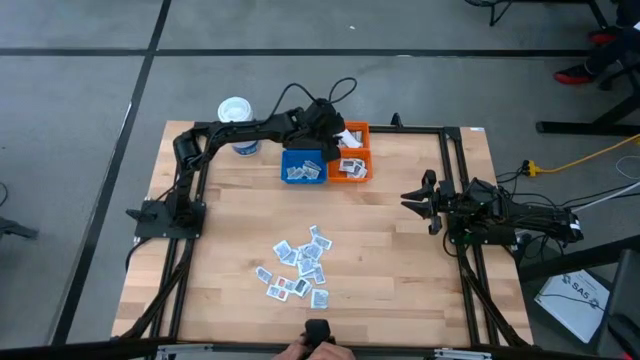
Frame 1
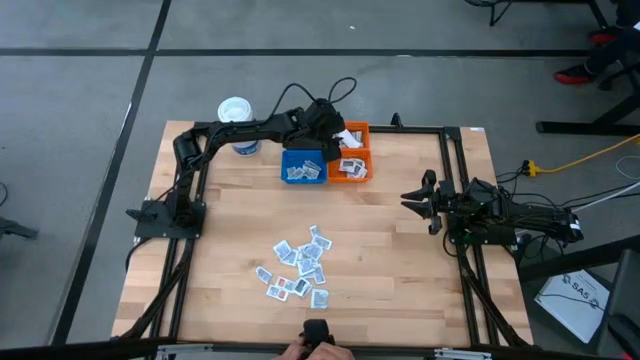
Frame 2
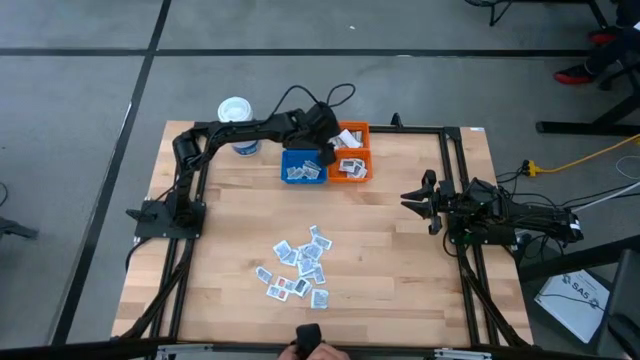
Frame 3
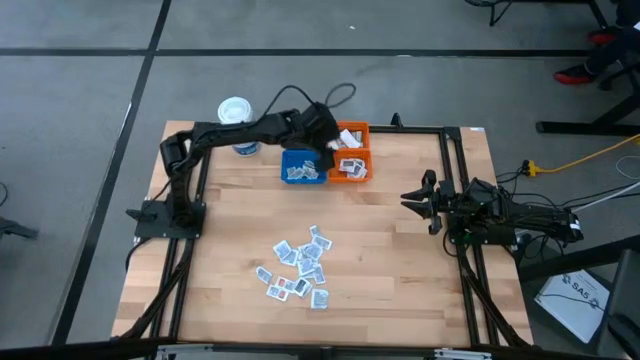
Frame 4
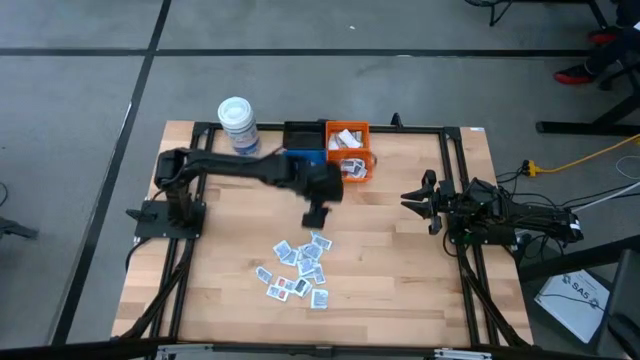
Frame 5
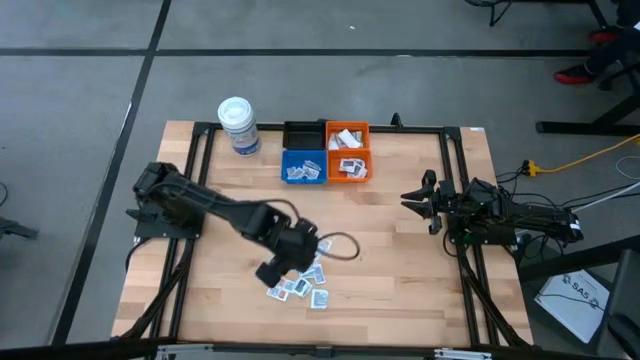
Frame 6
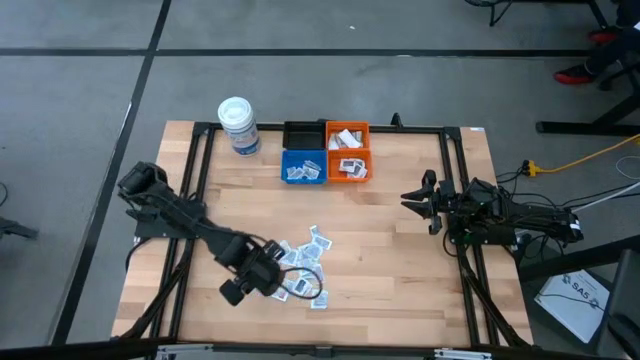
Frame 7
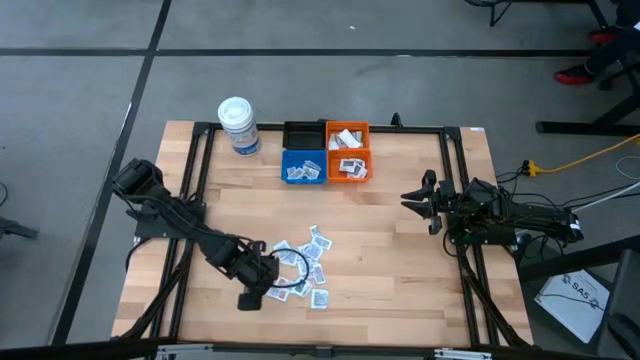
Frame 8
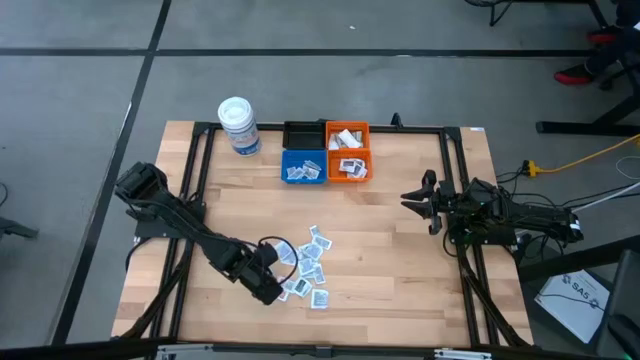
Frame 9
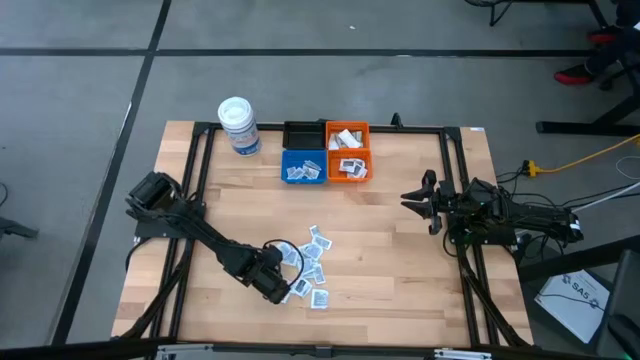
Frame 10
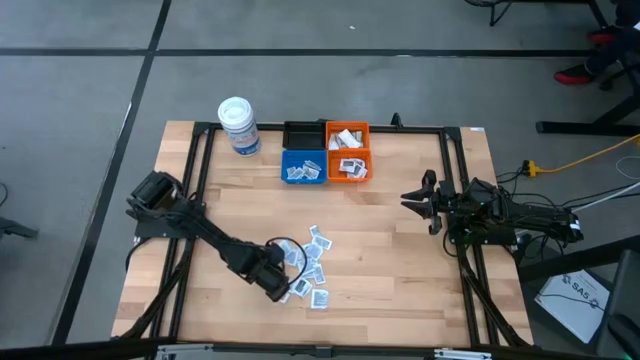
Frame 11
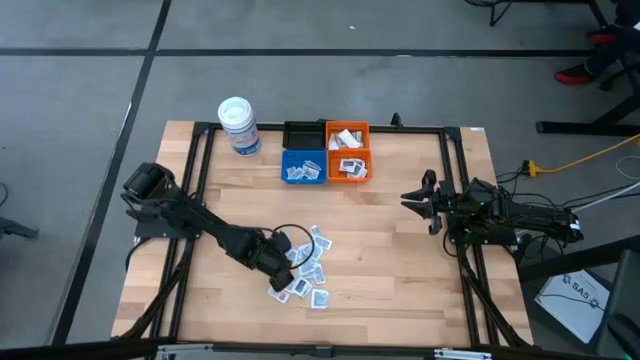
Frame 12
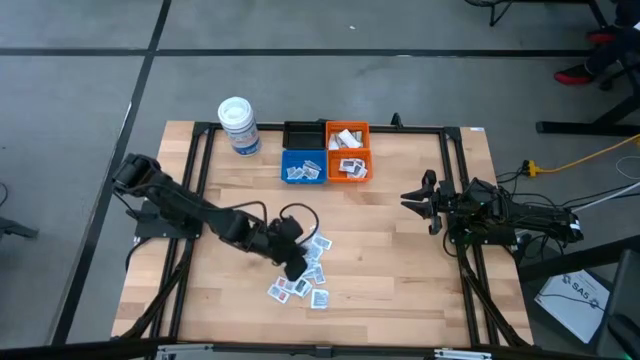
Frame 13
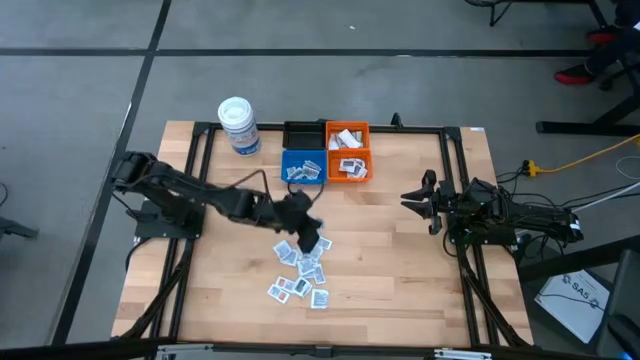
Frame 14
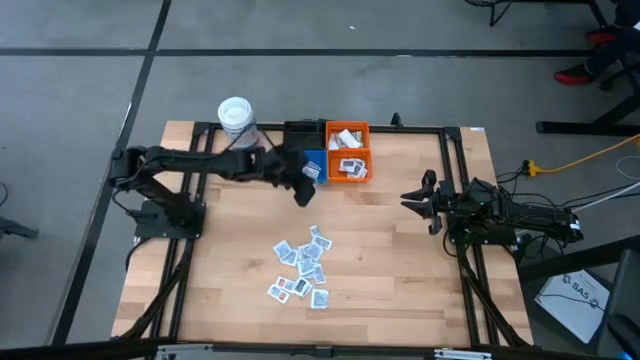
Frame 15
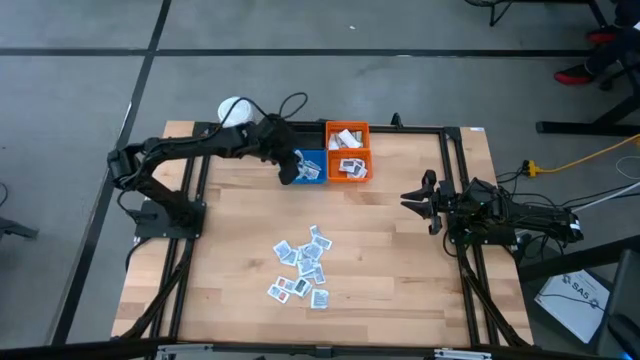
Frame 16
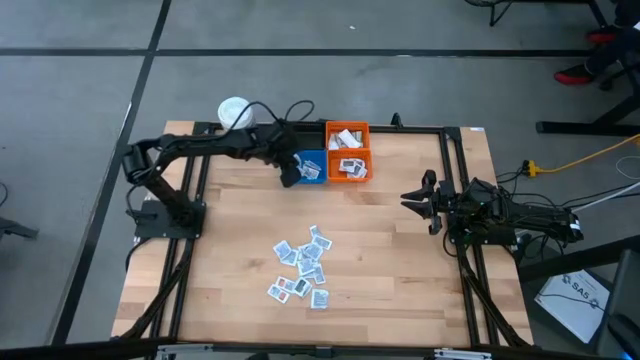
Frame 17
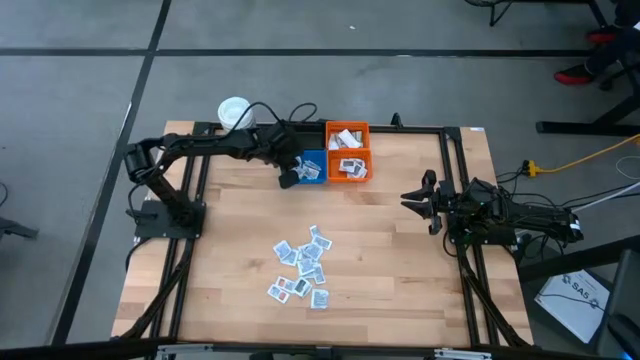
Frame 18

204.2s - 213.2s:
Task: Pick & Place First Aid Supplies
Put the ointment pack into the blue bin

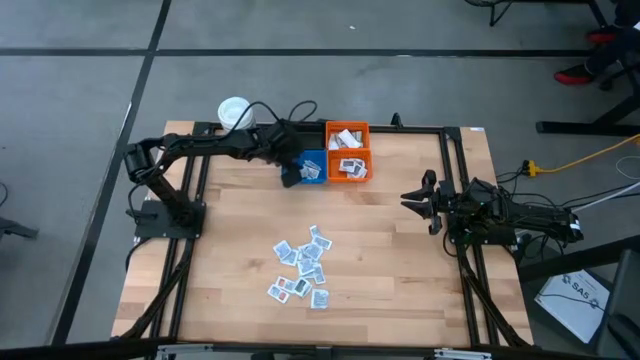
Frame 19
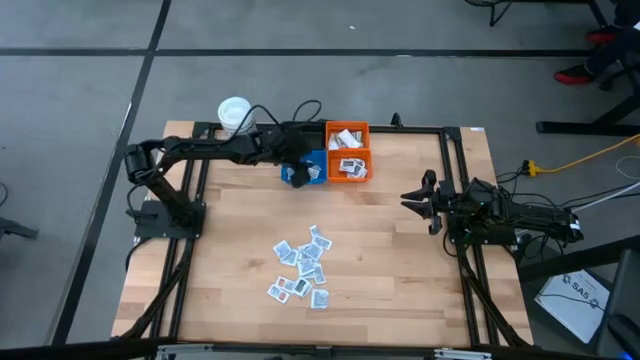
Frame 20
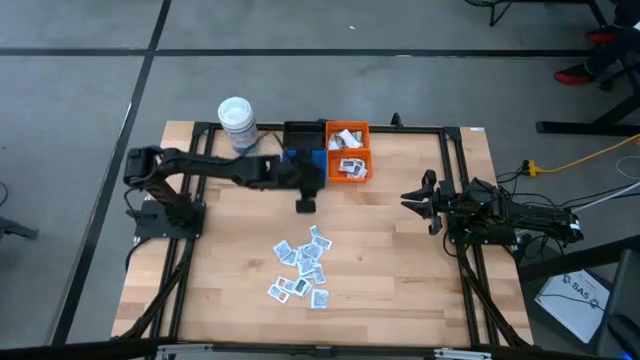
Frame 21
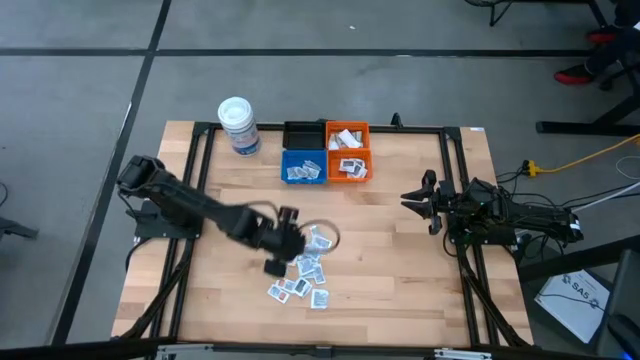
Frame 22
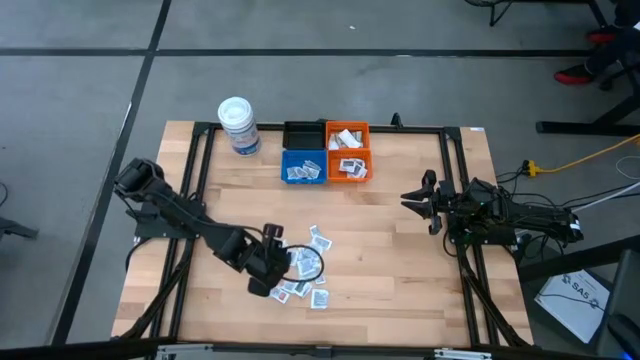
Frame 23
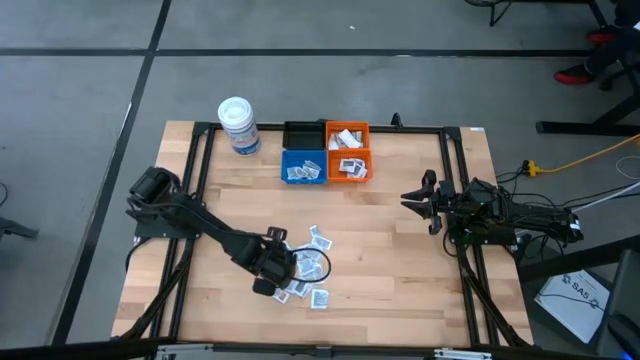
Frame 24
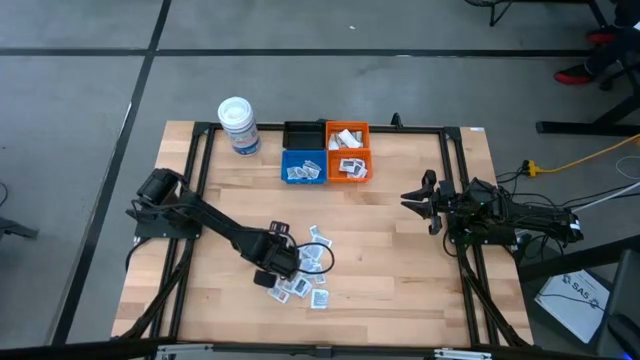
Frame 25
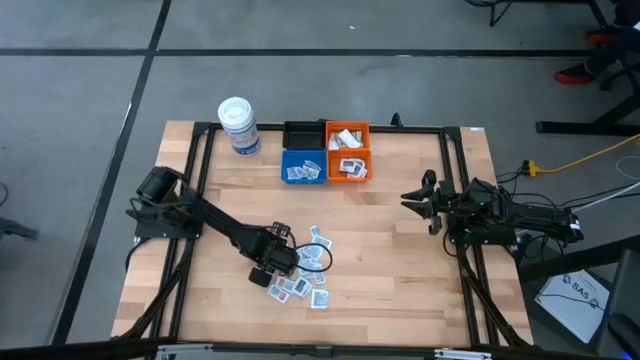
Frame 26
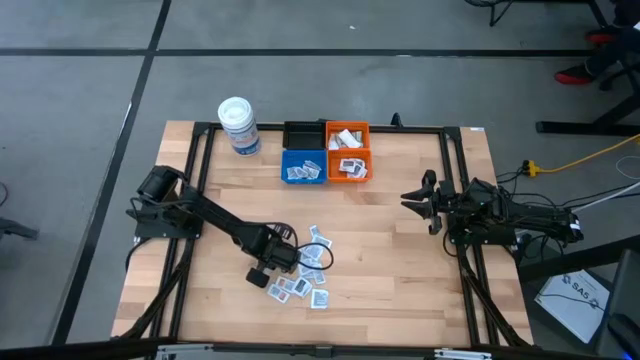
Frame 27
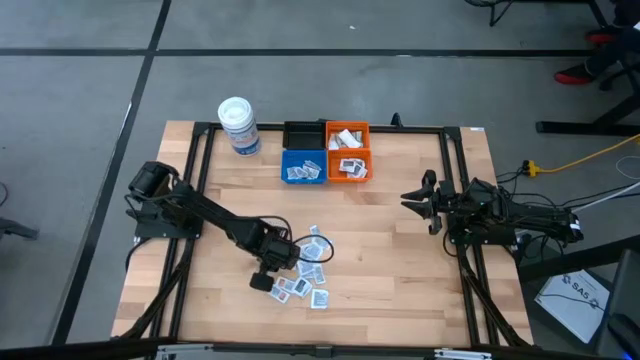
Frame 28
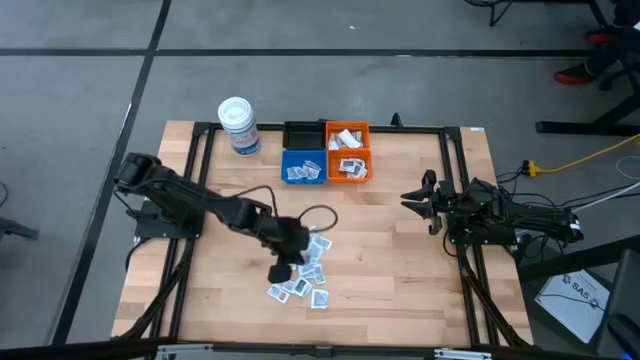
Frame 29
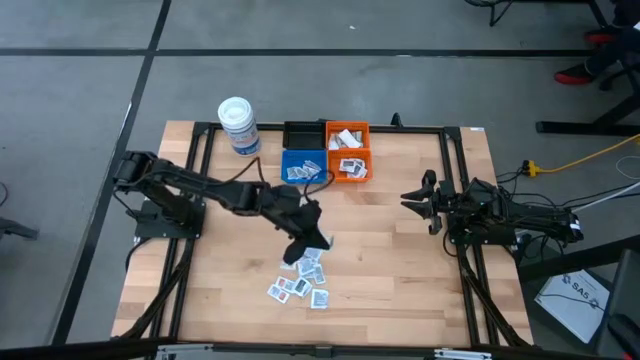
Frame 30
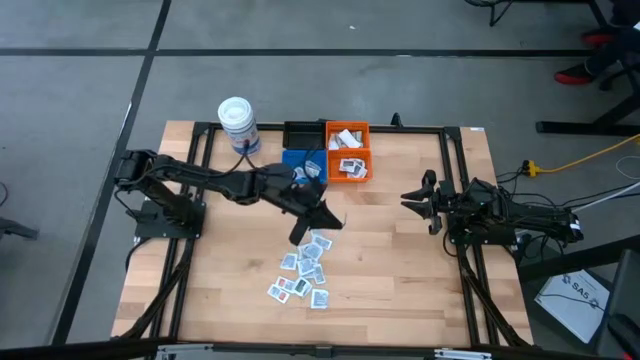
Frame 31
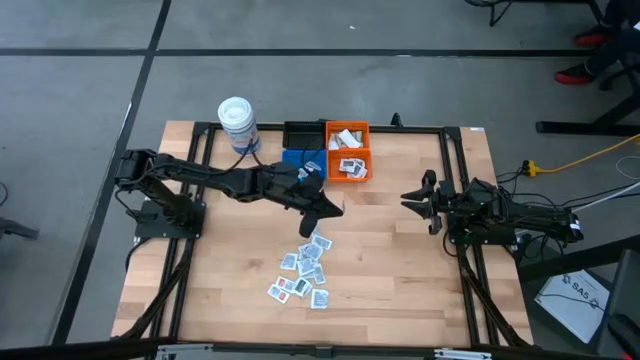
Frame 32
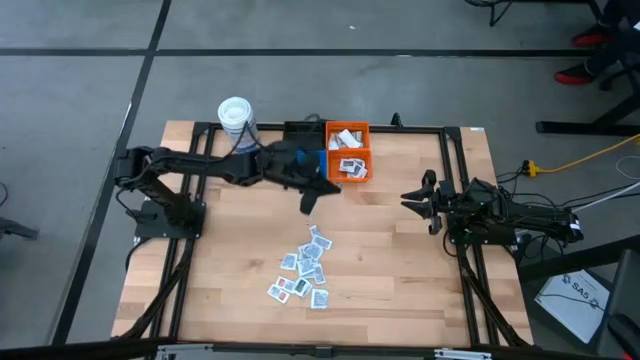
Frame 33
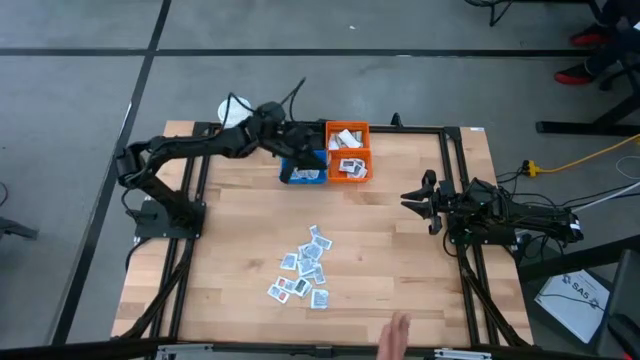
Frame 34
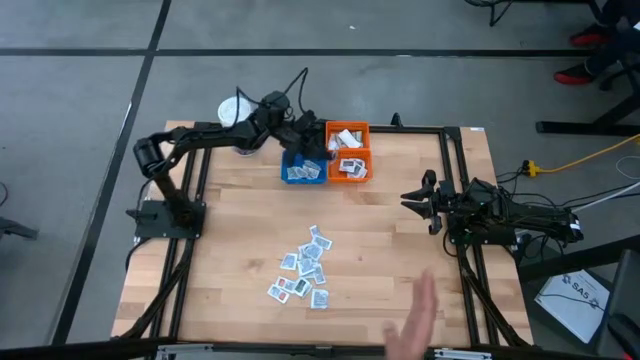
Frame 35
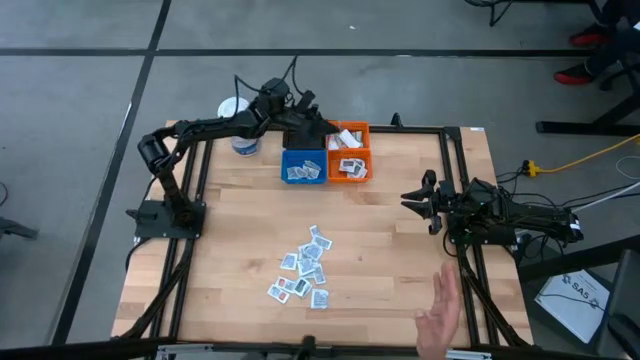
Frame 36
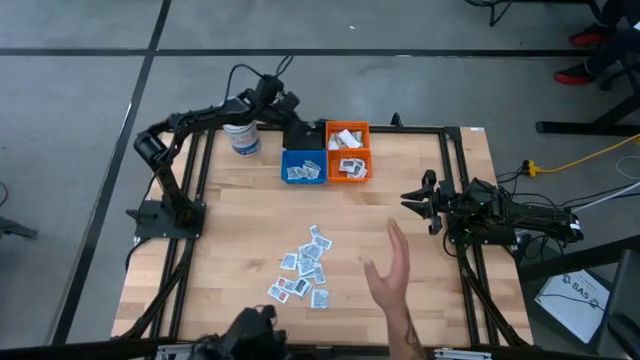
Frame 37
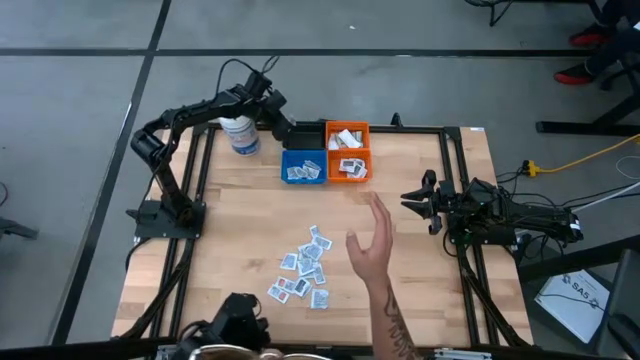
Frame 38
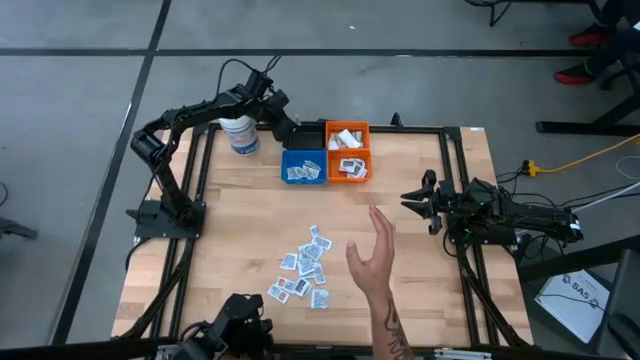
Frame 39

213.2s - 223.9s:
Put the alcohol pad into the black bin

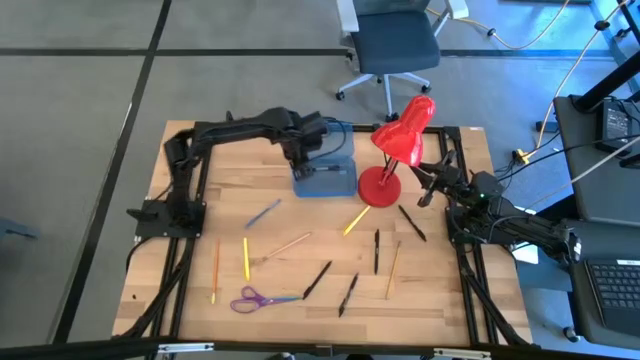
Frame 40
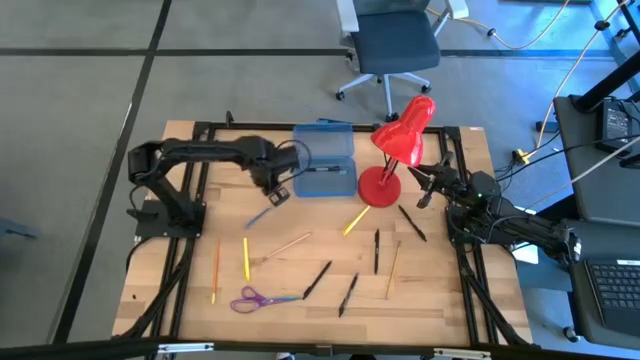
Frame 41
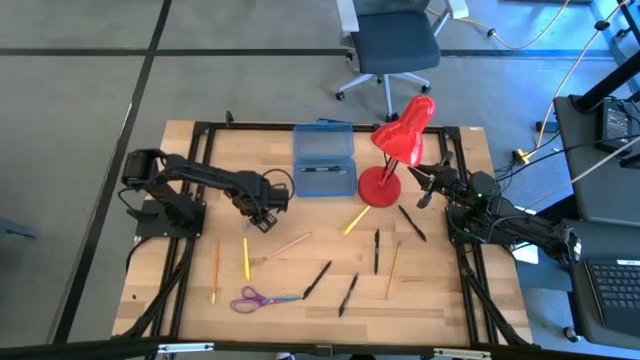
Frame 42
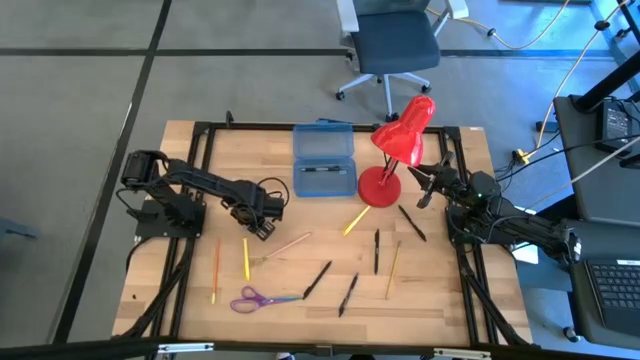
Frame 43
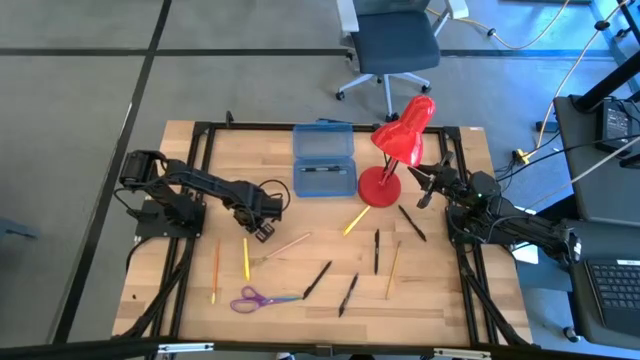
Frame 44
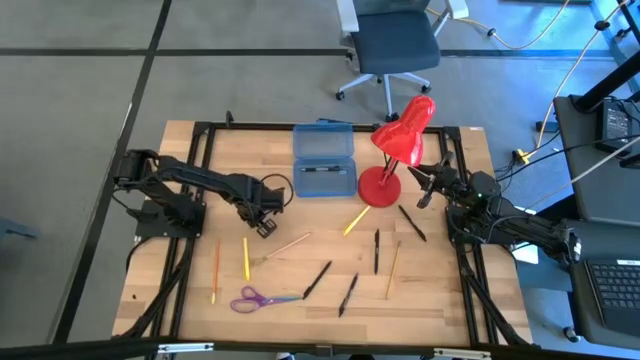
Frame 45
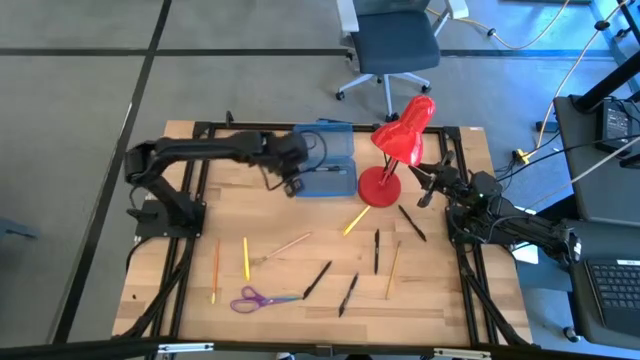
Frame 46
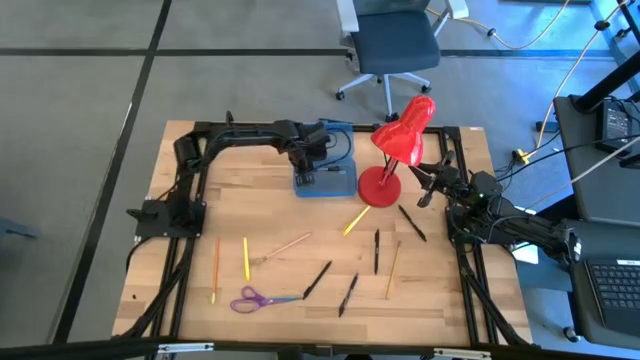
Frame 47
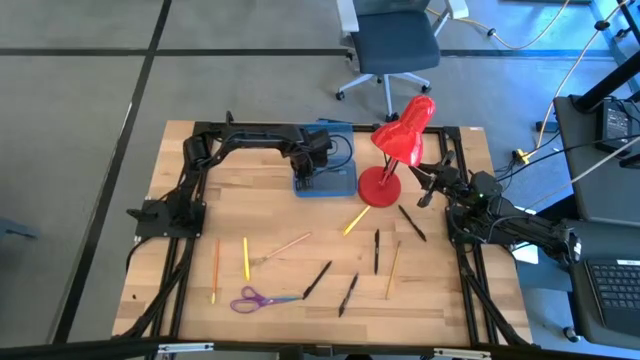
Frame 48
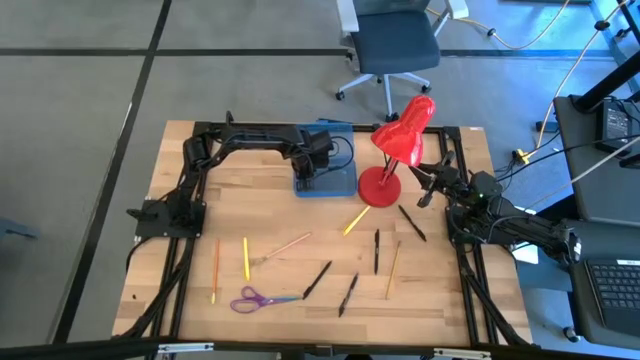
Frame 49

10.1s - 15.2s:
Task: Pick & place school supplies into a supply box
Put the blue pen into the blue supply box
